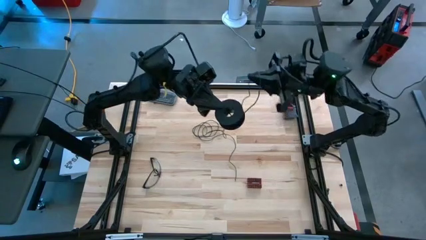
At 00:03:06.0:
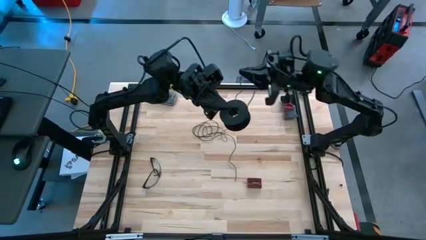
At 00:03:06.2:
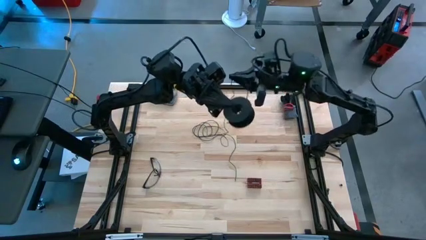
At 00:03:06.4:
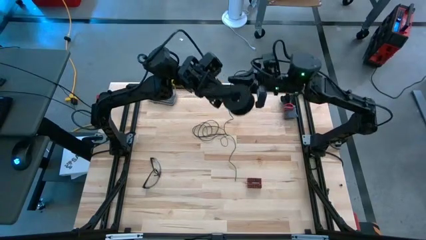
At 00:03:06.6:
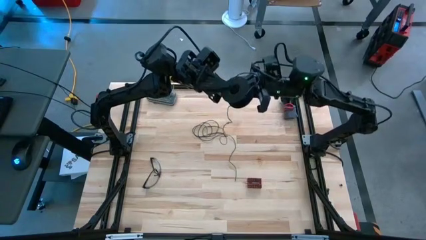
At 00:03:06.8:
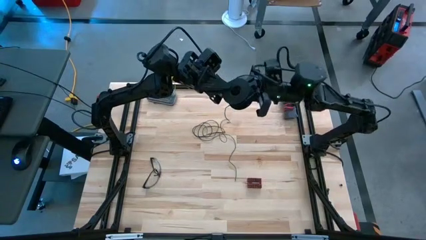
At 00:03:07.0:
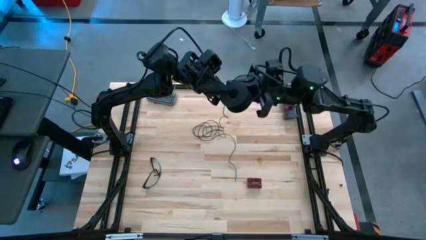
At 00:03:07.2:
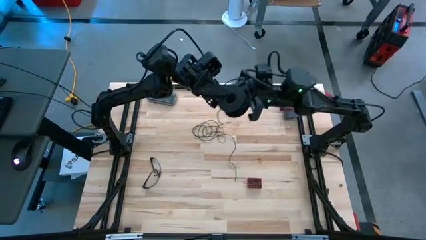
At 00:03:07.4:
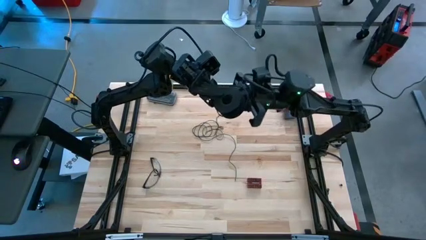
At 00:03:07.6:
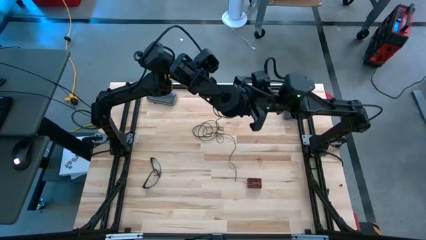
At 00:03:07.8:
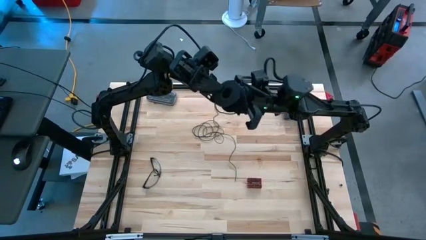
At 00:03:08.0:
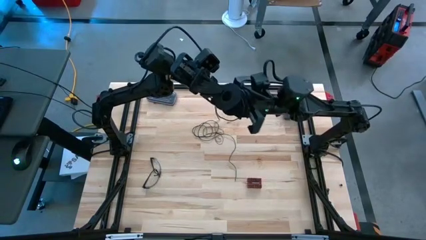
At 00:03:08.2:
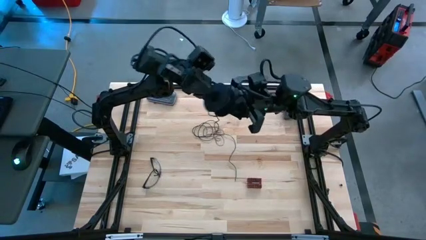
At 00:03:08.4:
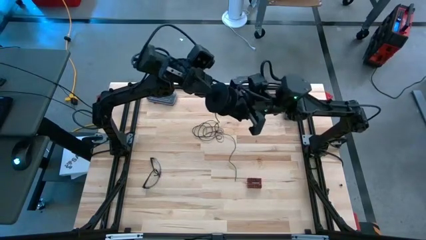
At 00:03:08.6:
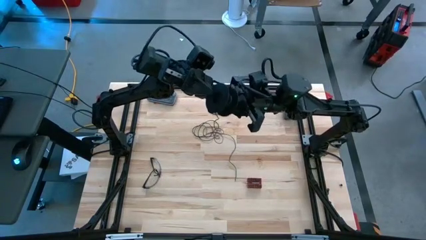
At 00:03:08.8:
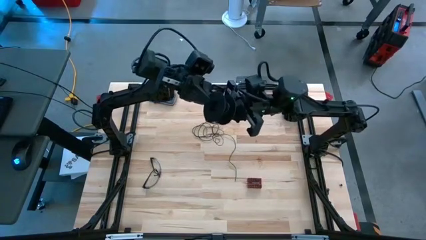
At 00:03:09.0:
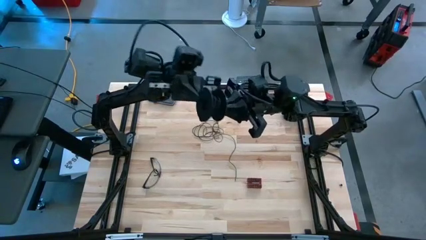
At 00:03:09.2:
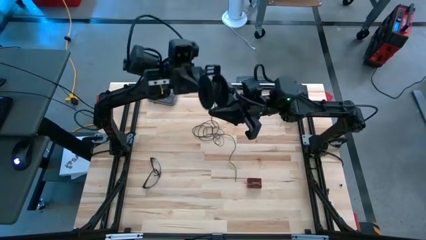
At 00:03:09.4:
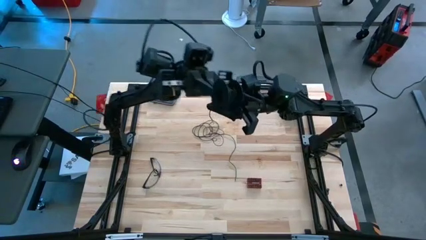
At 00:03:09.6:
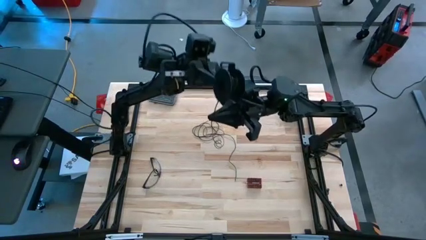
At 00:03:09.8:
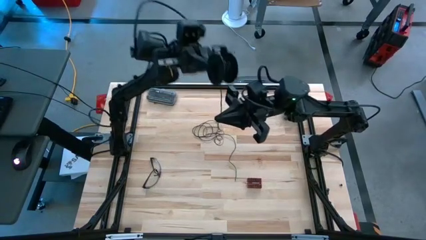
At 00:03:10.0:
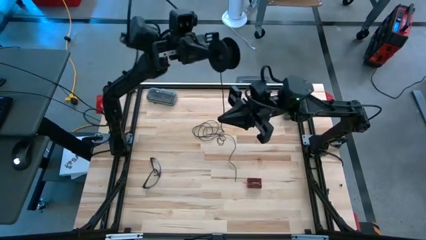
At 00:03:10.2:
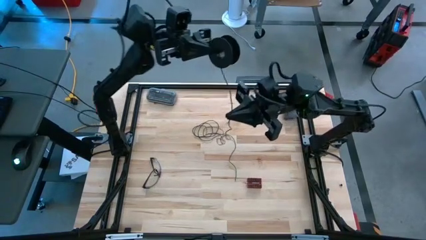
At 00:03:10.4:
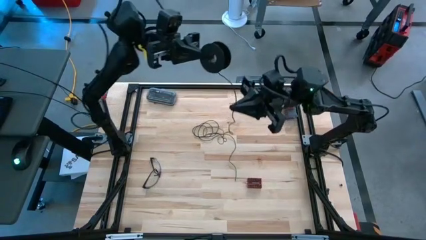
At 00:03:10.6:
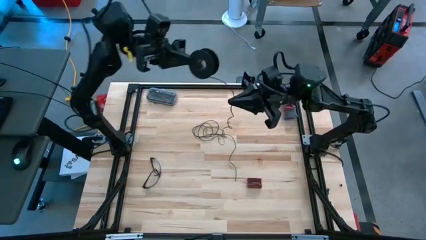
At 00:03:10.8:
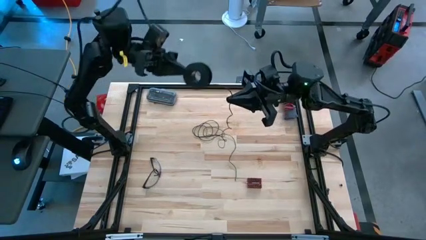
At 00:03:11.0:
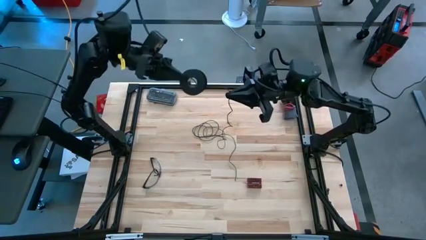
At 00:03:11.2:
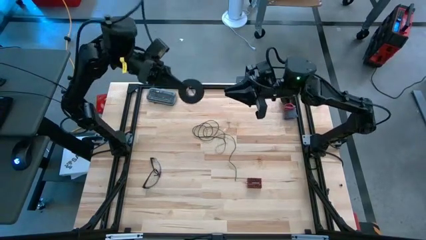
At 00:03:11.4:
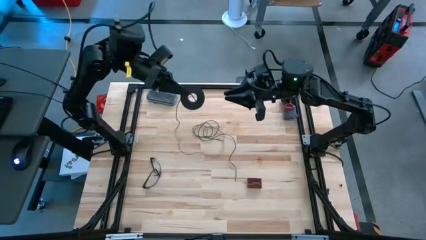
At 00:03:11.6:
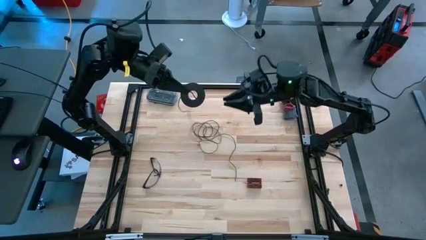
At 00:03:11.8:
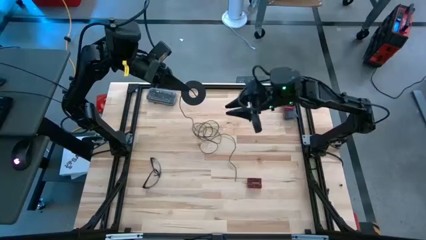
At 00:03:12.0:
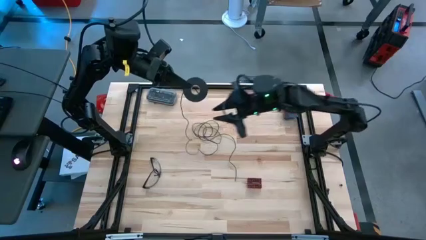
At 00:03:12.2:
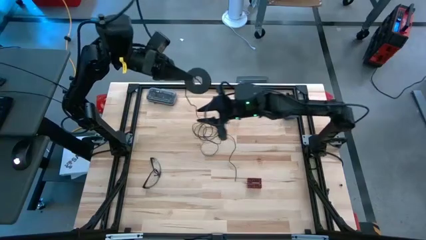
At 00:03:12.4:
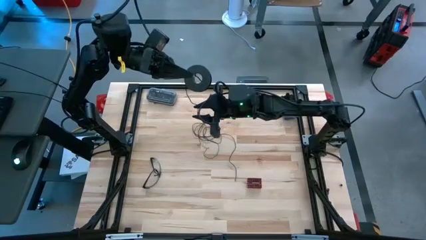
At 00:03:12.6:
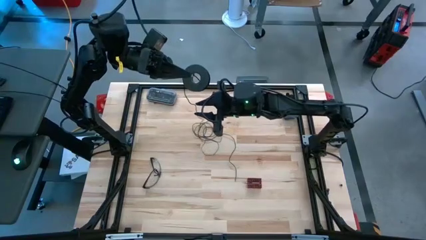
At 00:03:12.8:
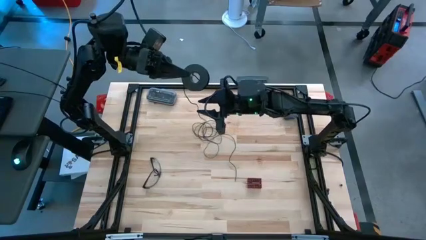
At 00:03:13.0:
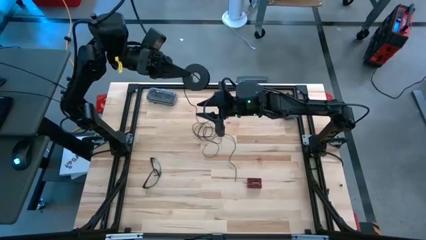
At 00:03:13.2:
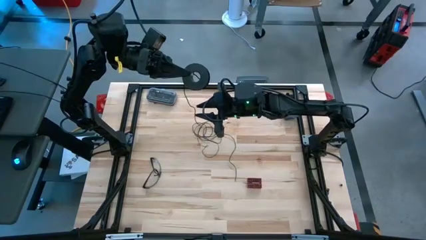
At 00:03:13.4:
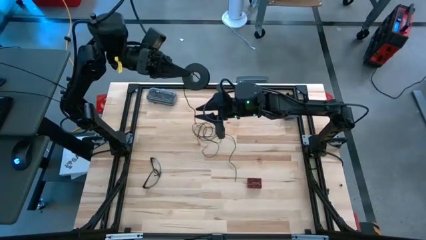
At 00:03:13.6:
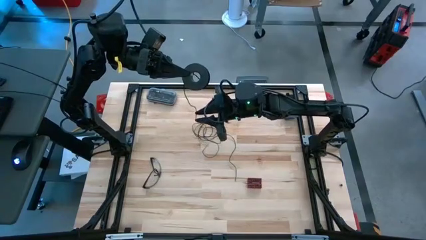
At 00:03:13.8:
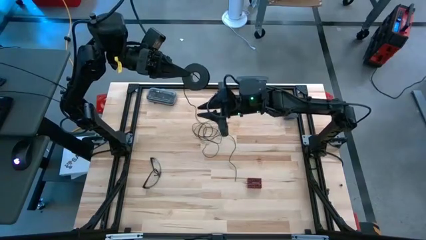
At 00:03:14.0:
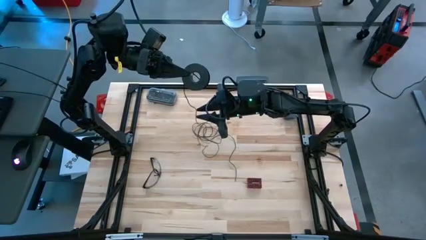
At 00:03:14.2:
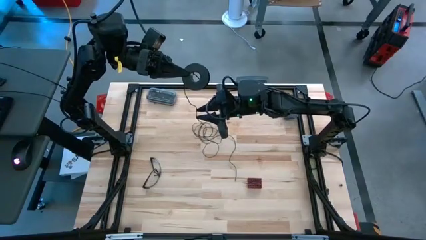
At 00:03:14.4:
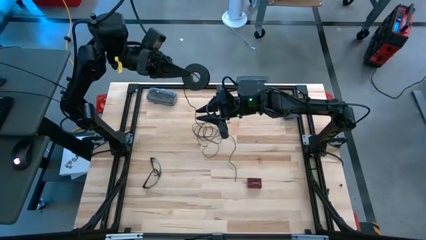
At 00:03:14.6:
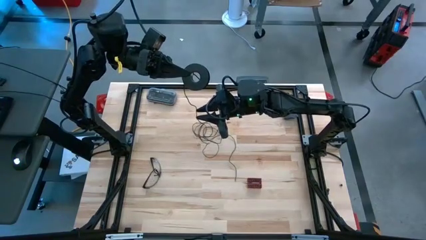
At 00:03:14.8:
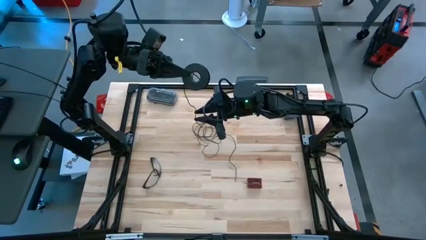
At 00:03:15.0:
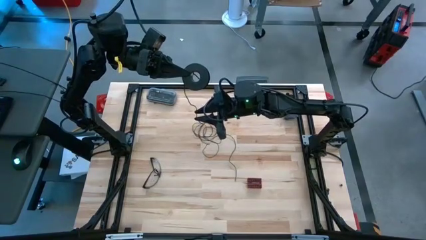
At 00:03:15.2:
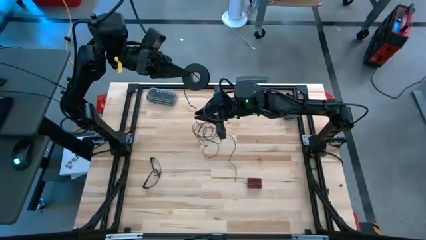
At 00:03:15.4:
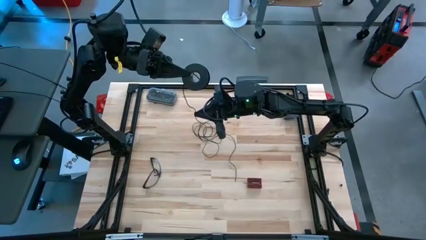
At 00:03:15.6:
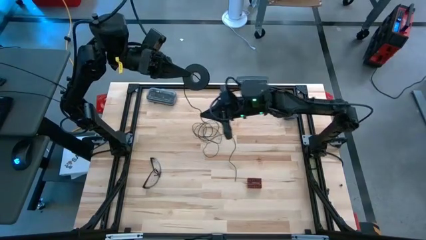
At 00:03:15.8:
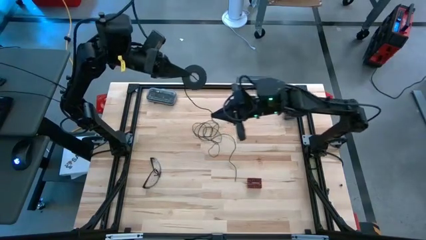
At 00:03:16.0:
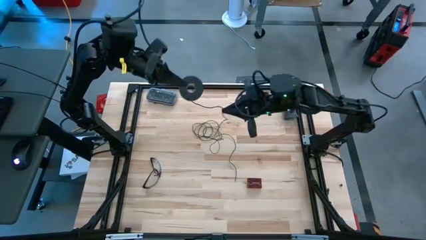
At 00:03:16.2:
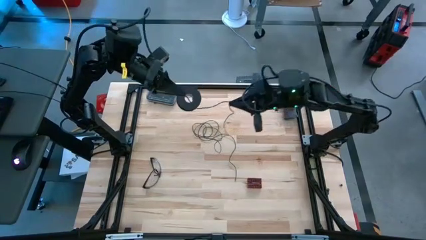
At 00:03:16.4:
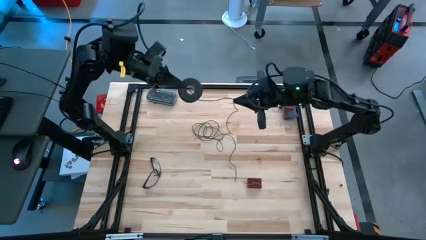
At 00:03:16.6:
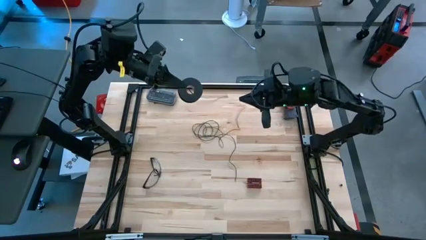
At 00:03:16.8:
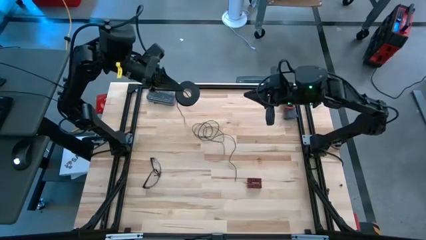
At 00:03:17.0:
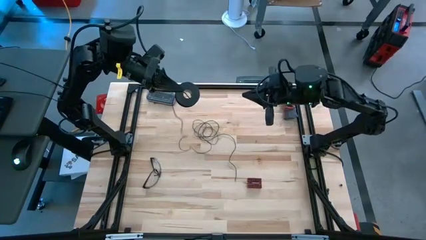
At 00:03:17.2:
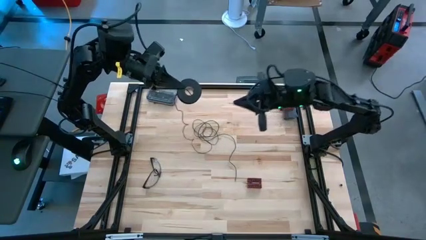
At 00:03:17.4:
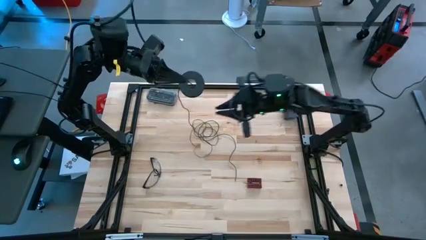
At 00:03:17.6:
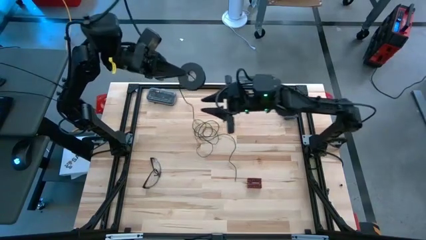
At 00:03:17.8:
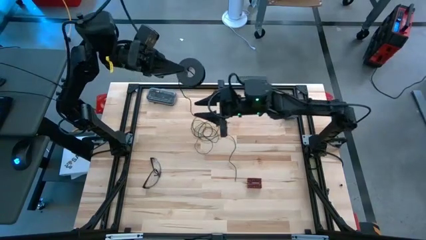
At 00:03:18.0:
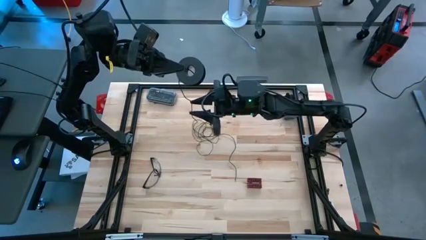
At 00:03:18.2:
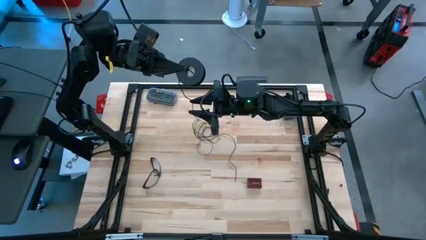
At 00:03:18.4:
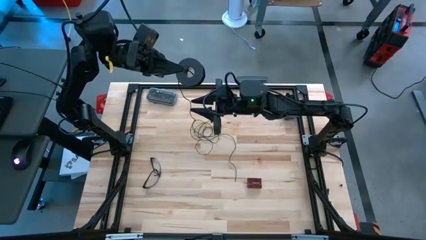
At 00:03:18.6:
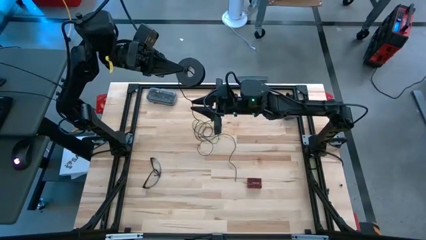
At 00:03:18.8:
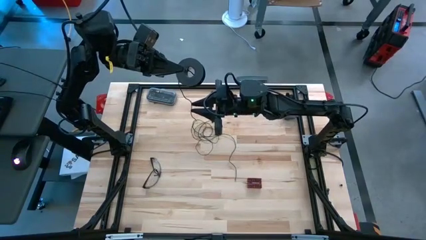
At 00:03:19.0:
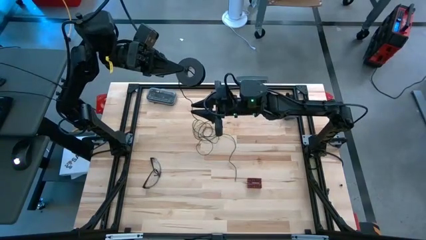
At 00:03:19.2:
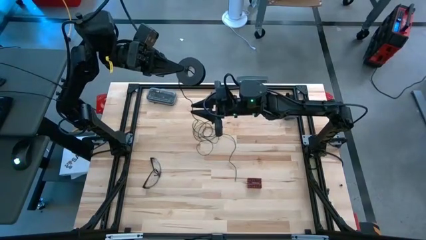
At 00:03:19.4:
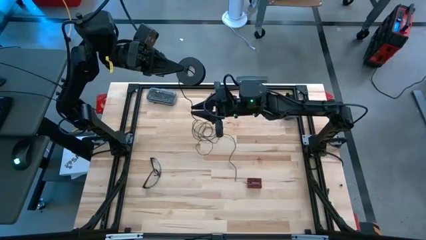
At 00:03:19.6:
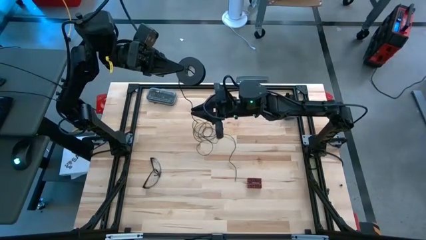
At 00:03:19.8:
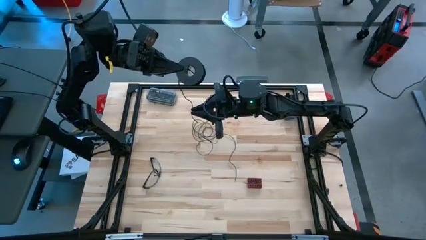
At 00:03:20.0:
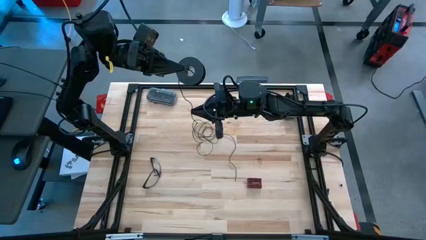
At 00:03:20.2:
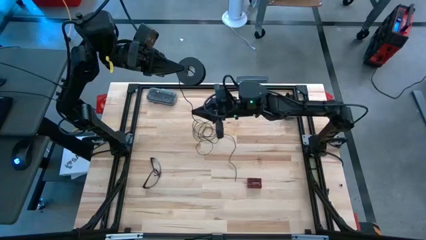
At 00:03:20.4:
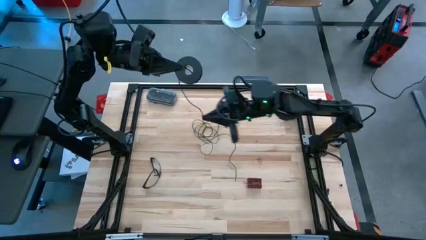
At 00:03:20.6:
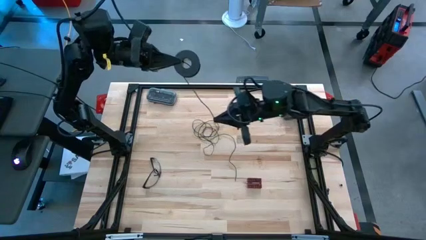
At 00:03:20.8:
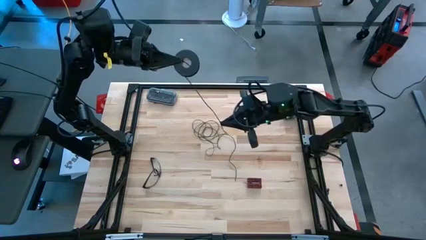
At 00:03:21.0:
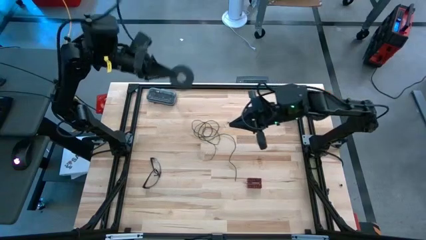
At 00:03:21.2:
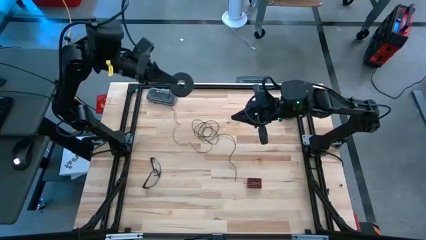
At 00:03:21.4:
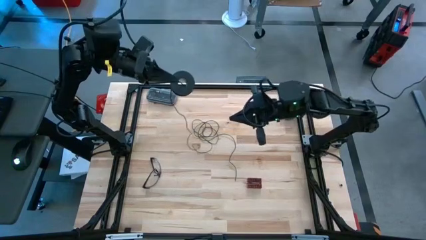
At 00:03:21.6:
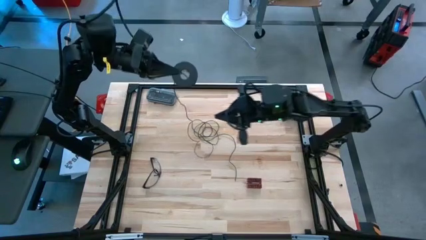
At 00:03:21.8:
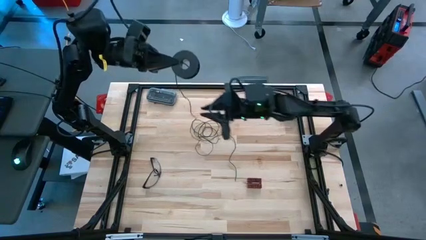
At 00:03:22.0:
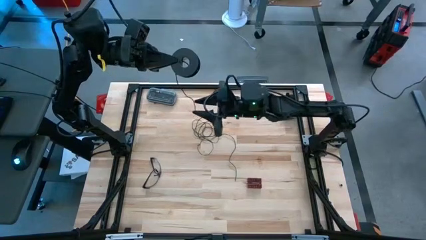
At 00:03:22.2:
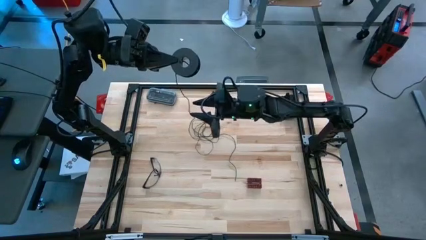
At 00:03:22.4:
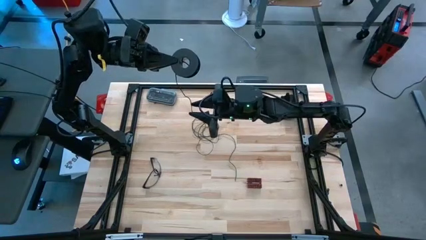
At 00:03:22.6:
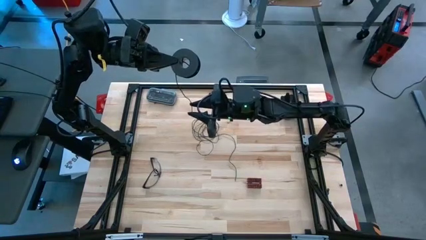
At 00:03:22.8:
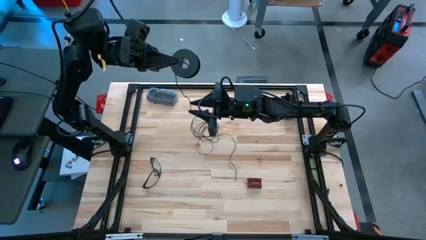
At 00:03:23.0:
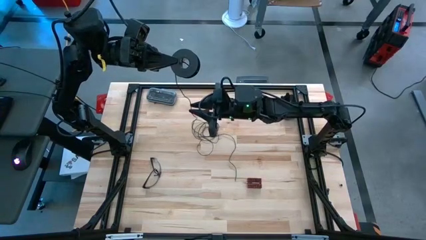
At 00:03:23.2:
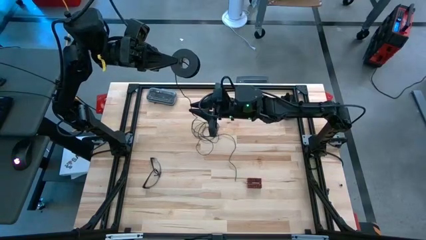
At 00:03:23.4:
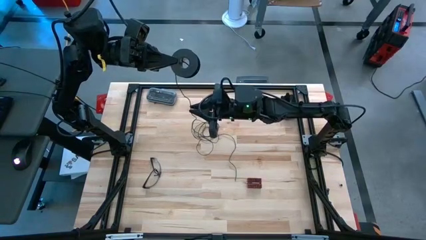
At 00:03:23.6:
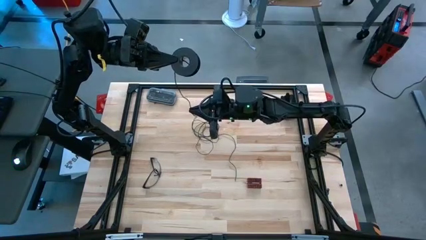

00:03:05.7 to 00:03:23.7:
Task: Coil cords
Coil the black wire into the spool
